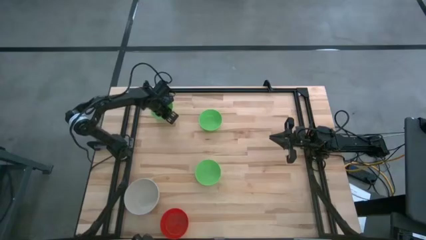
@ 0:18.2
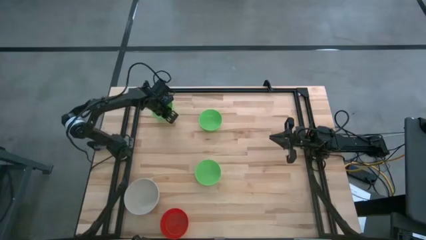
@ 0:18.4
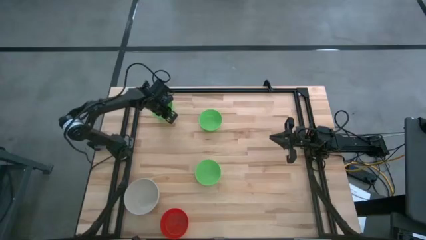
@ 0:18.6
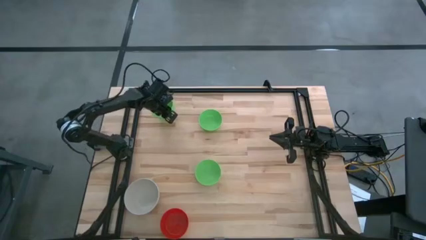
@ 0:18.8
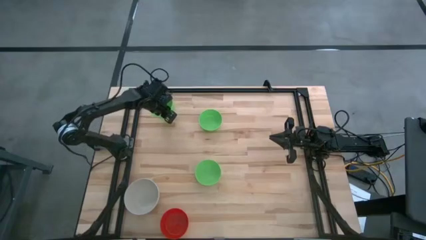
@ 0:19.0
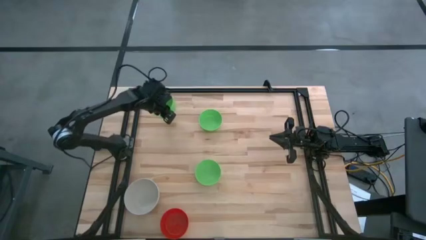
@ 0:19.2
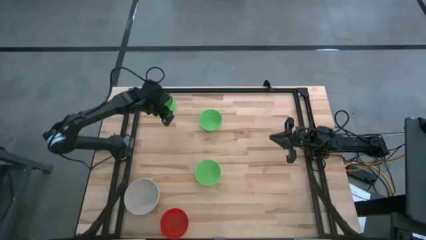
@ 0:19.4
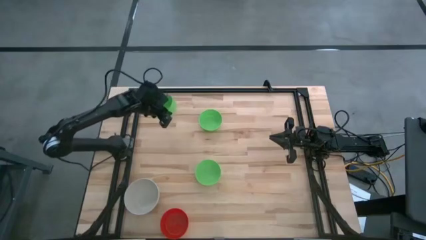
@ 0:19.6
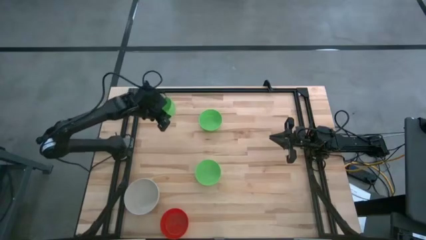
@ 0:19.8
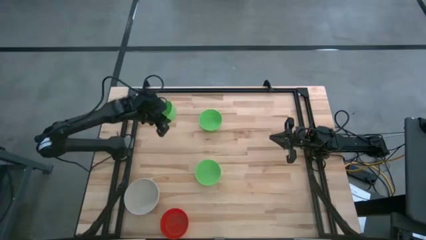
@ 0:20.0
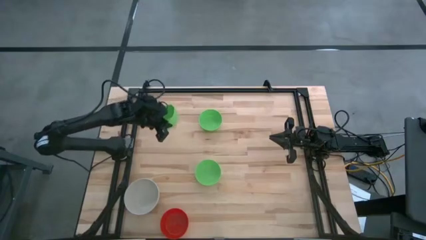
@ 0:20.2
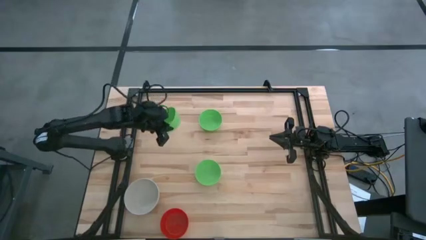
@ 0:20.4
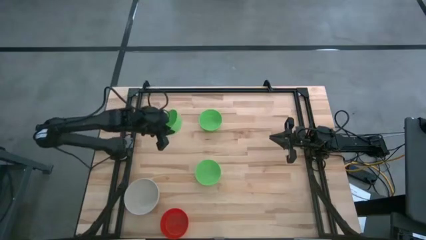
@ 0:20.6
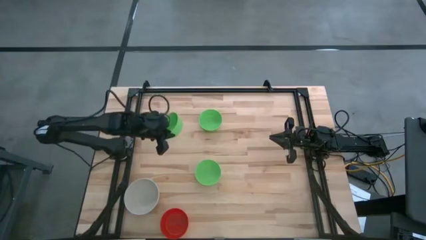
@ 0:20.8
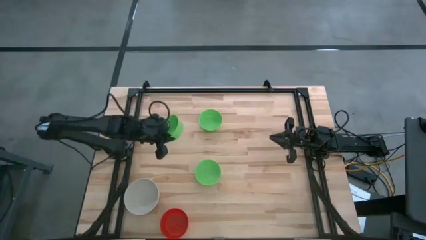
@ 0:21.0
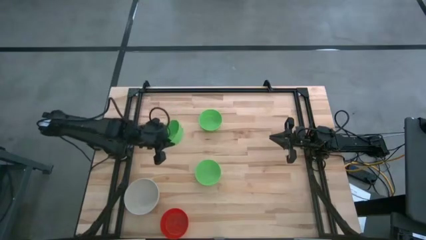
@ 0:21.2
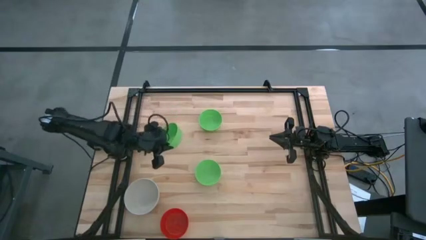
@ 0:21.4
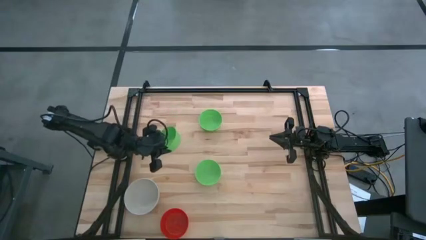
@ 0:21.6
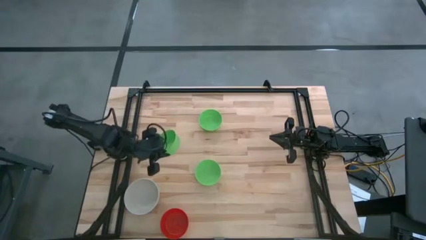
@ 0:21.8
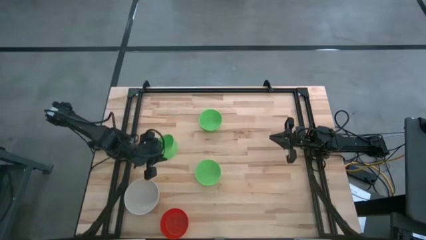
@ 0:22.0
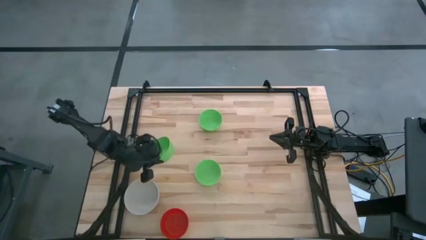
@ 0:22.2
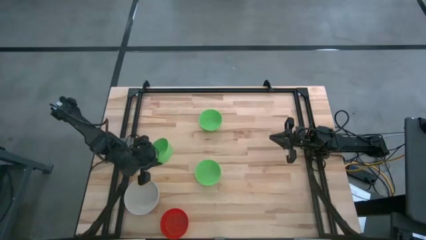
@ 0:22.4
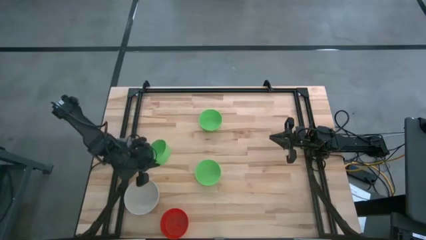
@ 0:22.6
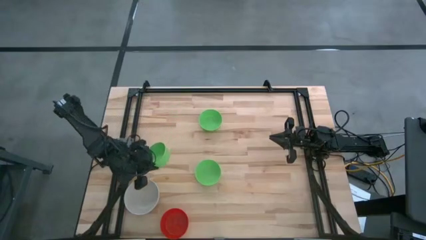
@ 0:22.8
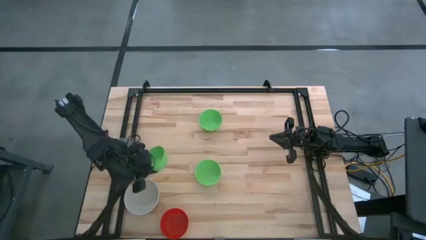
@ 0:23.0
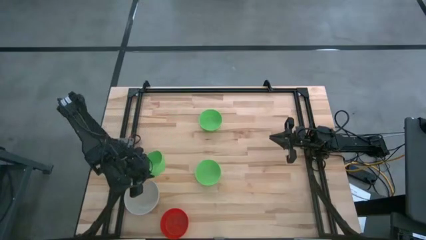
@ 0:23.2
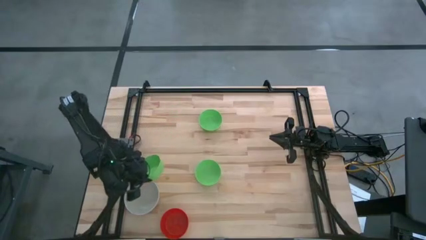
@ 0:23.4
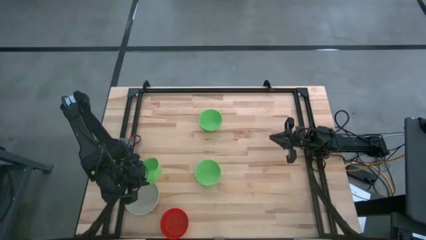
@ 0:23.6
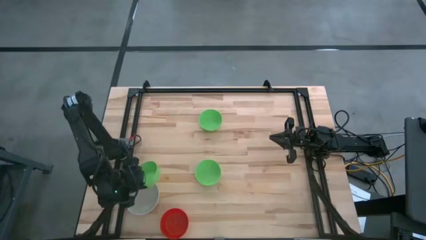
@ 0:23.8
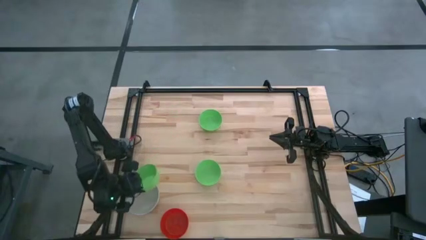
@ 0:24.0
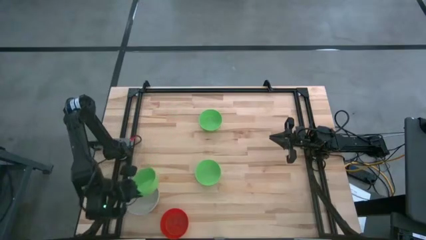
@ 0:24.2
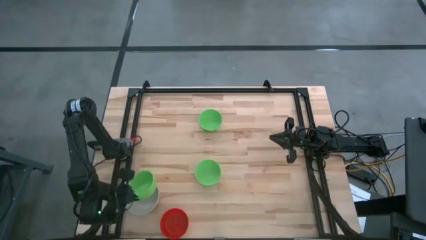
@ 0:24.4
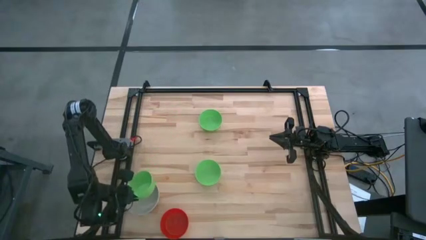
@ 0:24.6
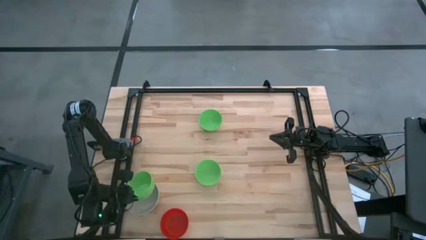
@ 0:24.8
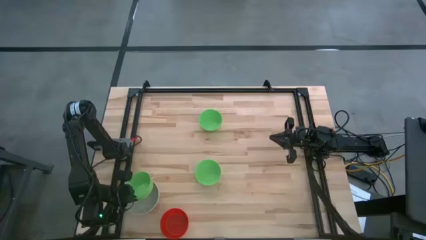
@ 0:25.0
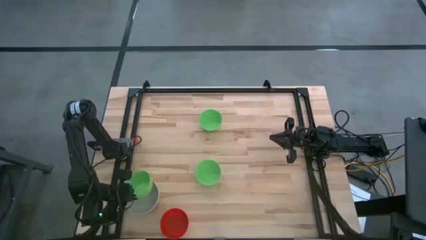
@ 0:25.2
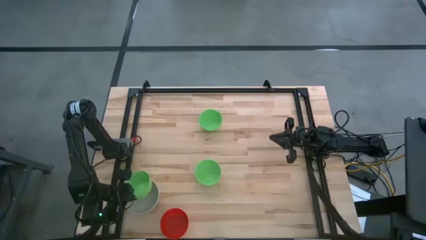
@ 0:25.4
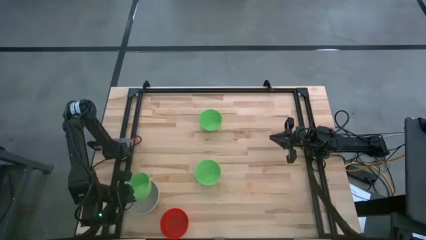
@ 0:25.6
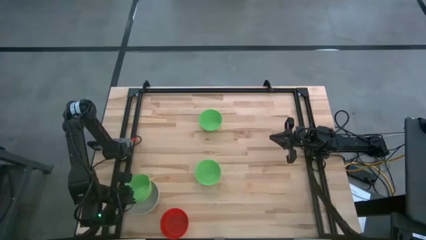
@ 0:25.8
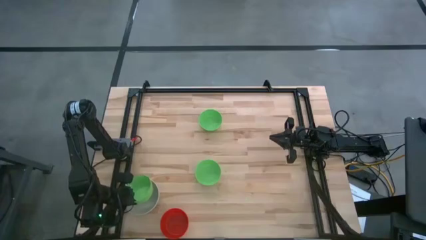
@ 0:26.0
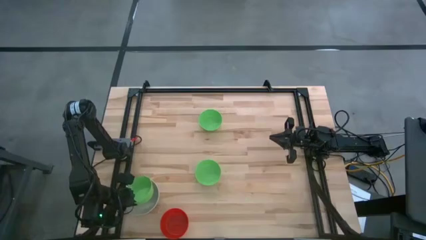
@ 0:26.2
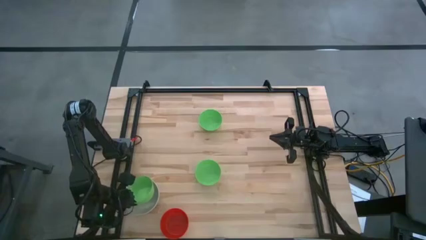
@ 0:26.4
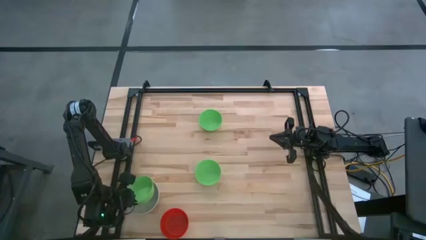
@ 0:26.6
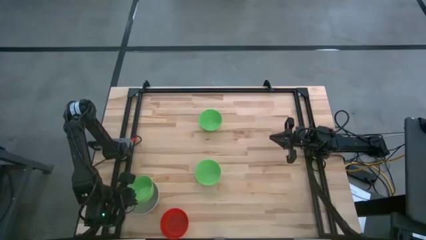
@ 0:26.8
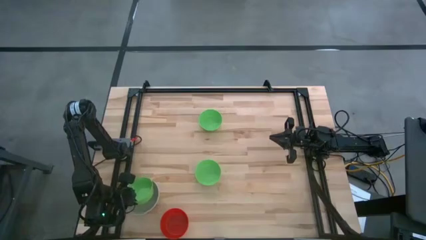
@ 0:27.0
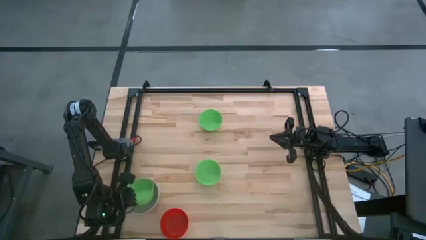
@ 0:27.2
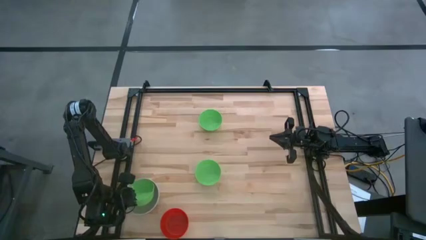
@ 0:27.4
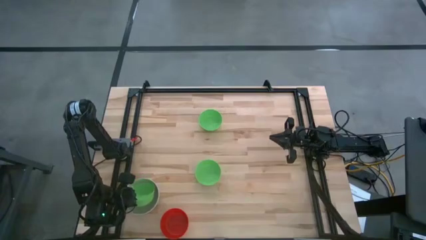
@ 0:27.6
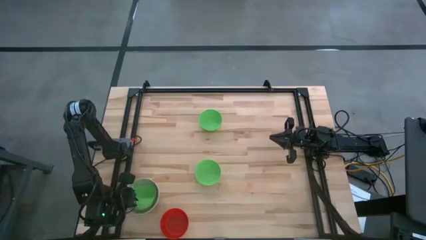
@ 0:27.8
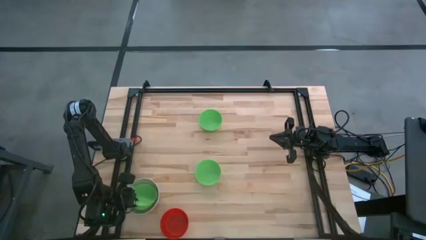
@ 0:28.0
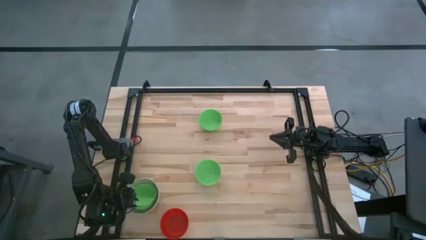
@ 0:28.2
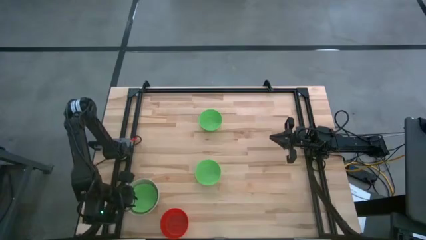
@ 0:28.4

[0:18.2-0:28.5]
Stack the top green bowl on the white bowl
